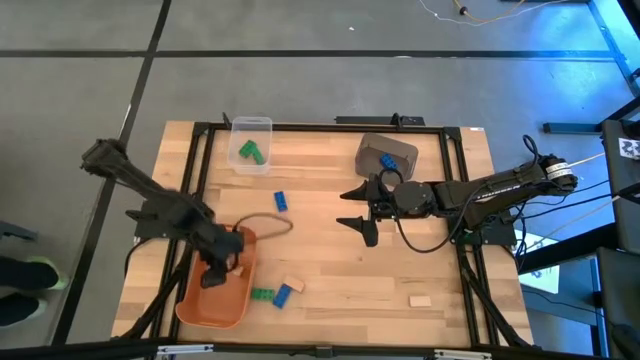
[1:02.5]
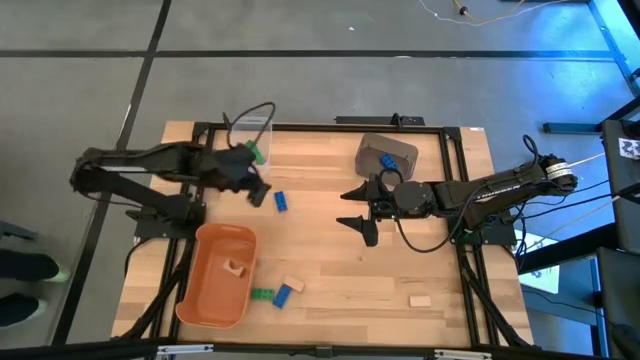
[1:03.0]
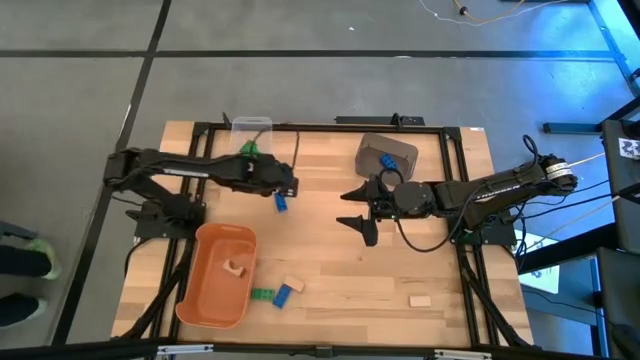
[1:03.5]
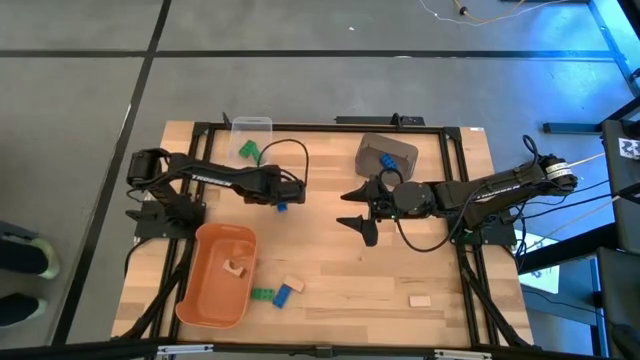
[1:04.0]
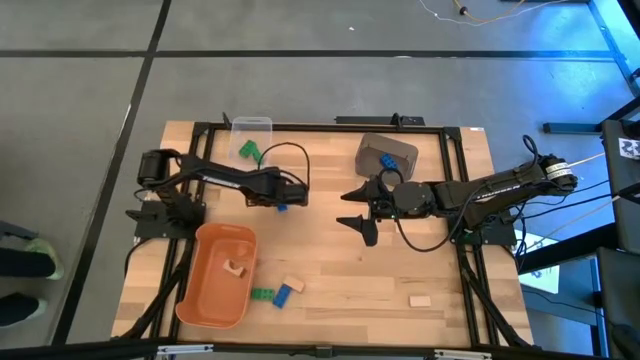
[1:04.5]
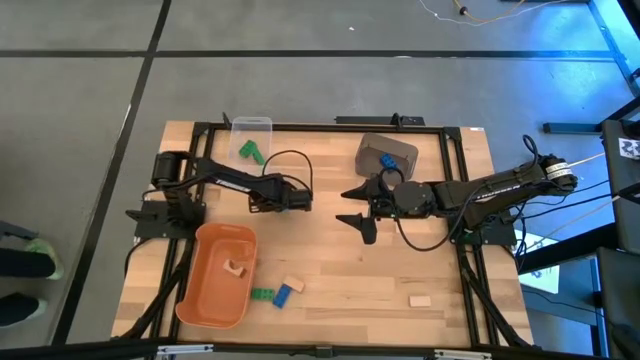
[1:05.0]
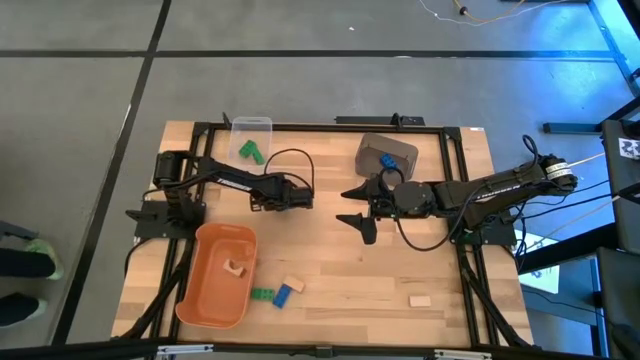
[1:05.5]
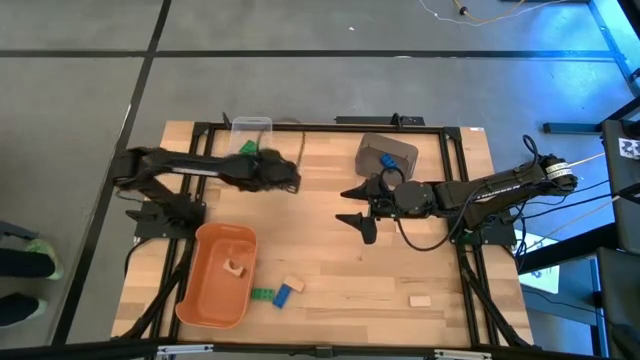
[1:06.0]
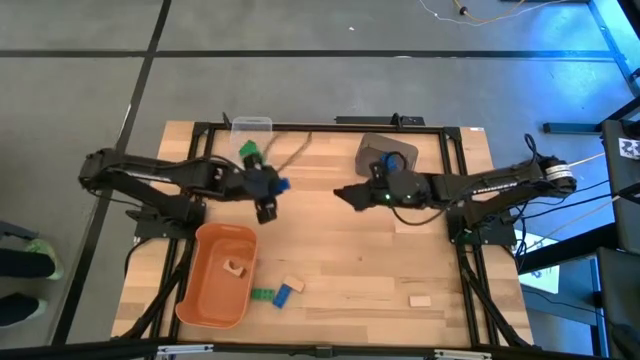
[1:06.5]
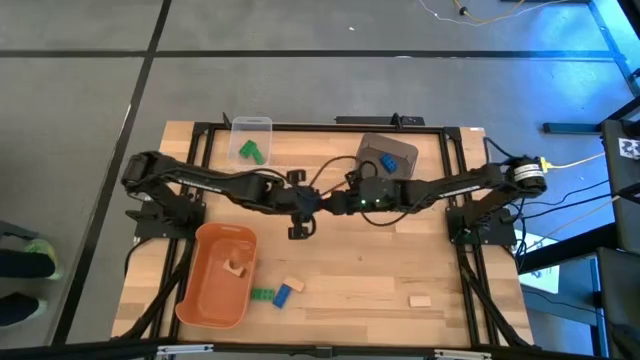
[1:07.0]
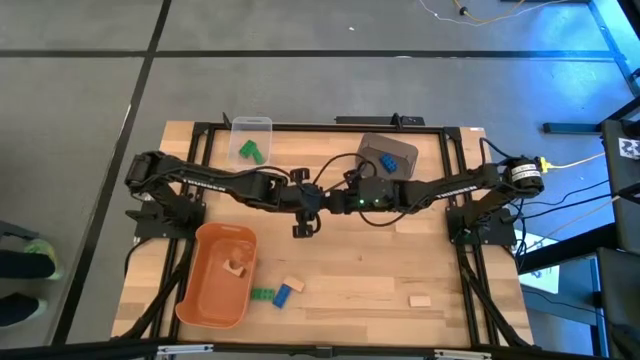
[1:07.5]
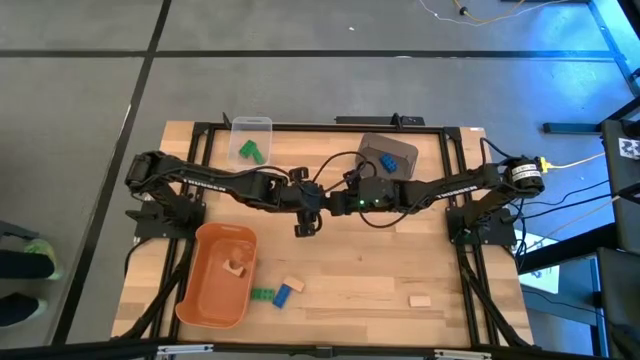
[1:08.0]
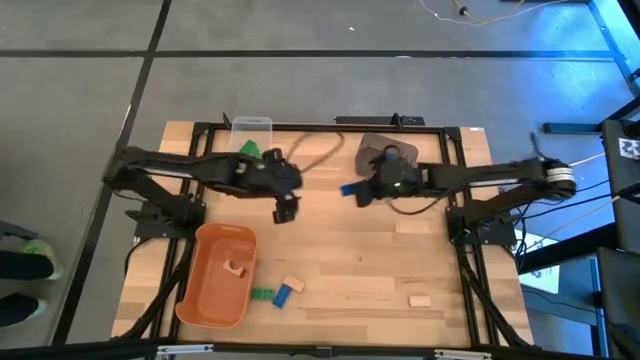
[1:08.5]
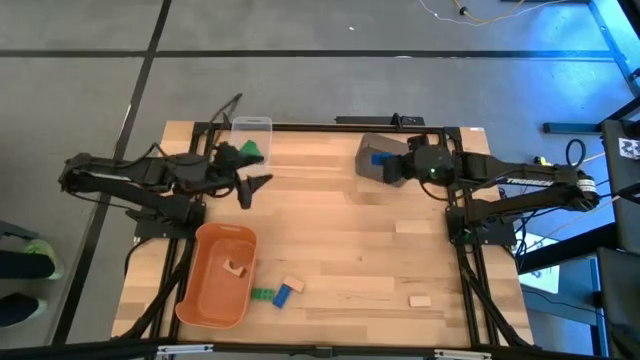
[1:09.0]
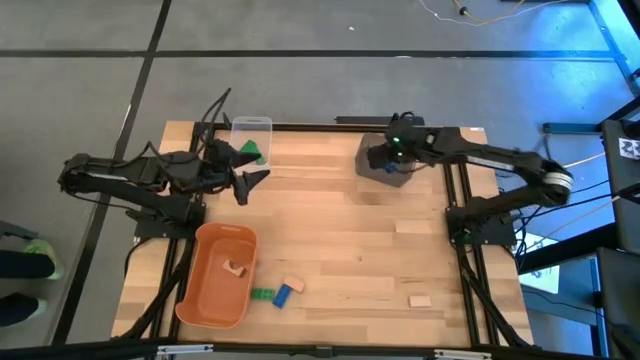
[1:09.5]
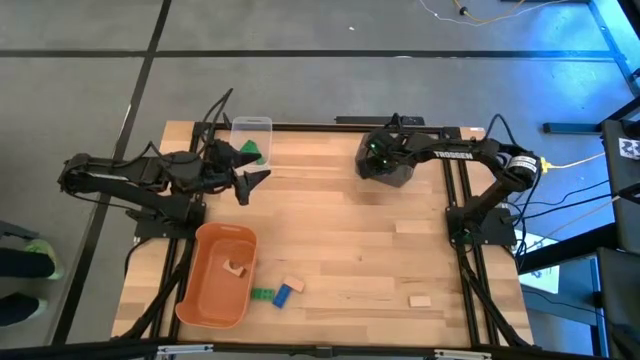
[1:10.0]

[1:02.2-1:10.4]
Task: Sort & place blocks by color
Put the top blue game piece into the black bin

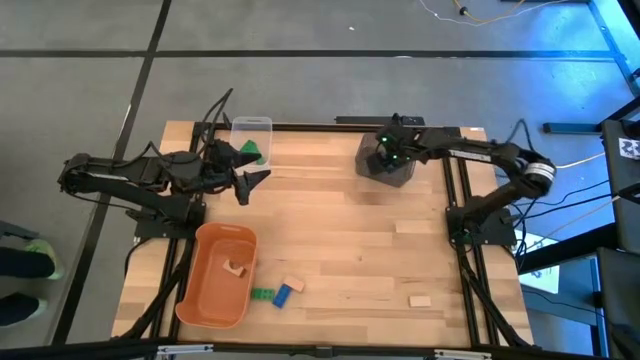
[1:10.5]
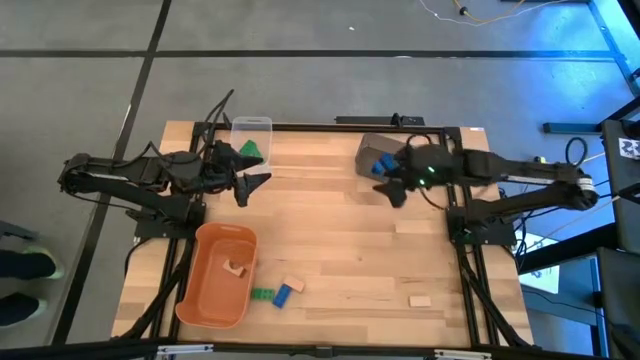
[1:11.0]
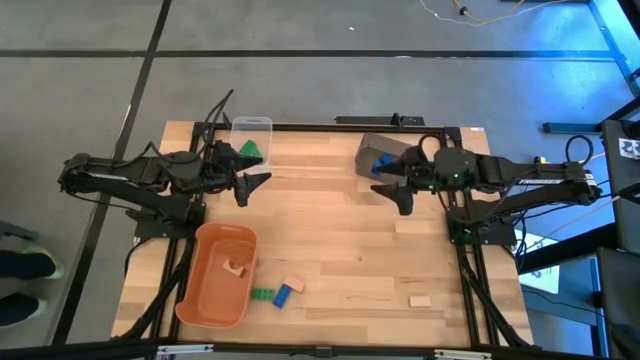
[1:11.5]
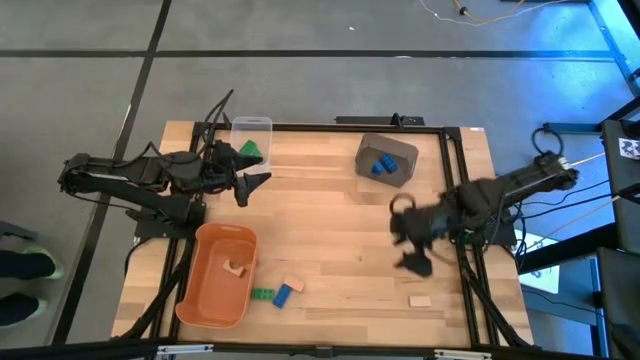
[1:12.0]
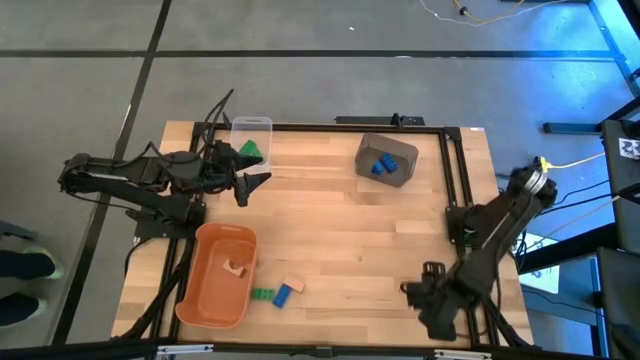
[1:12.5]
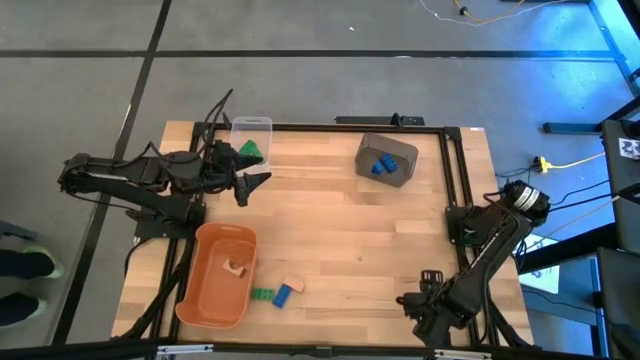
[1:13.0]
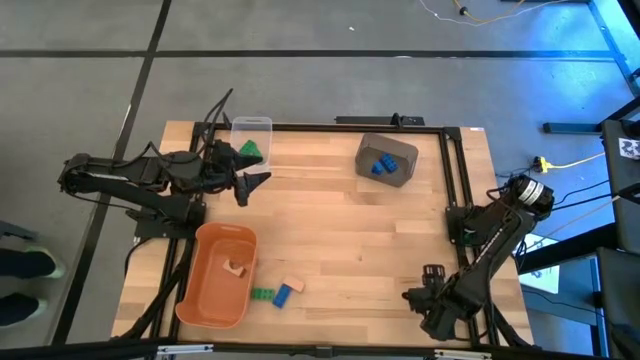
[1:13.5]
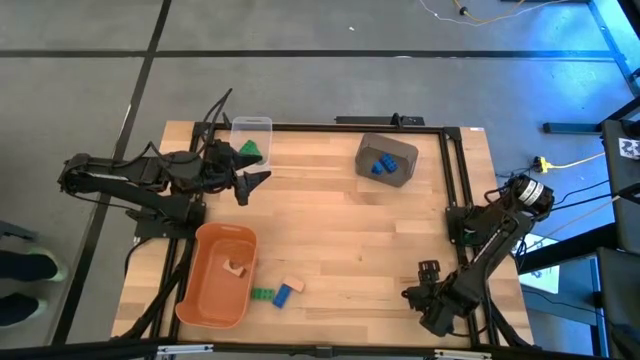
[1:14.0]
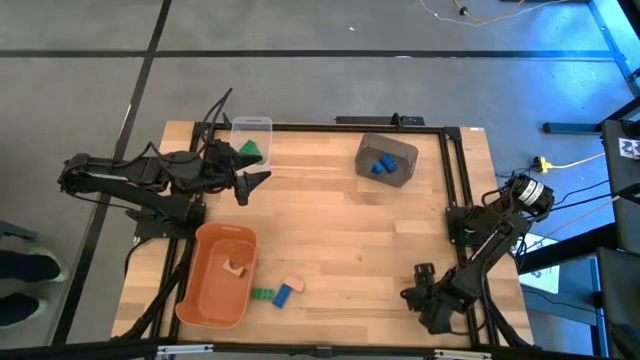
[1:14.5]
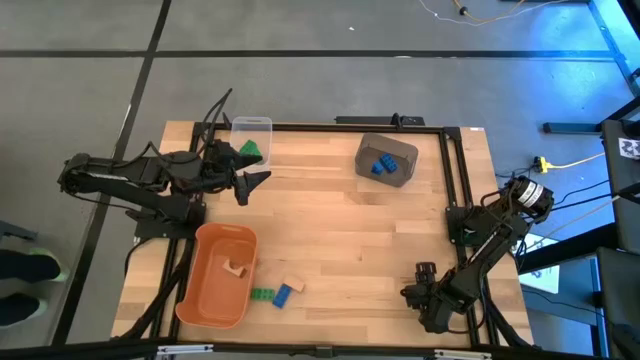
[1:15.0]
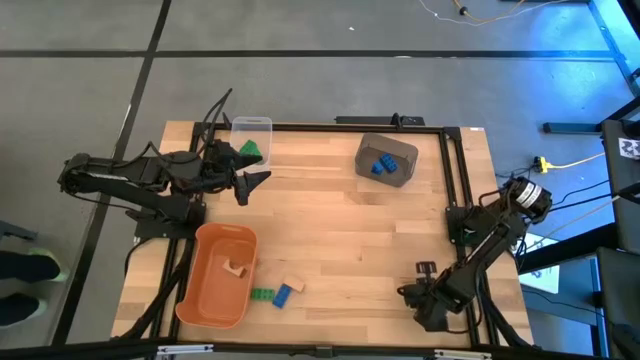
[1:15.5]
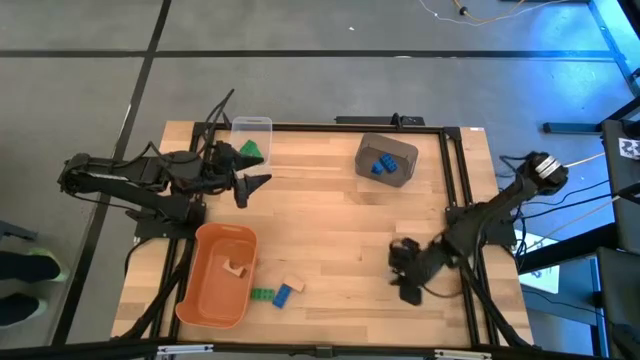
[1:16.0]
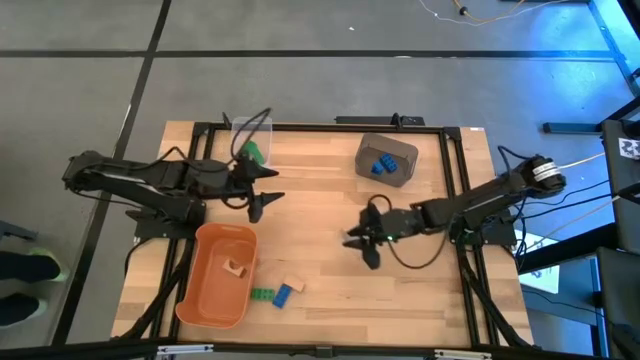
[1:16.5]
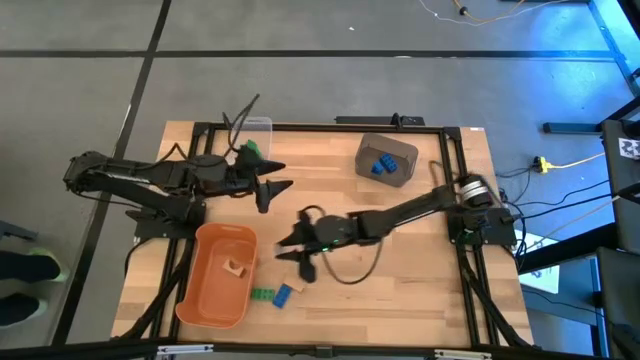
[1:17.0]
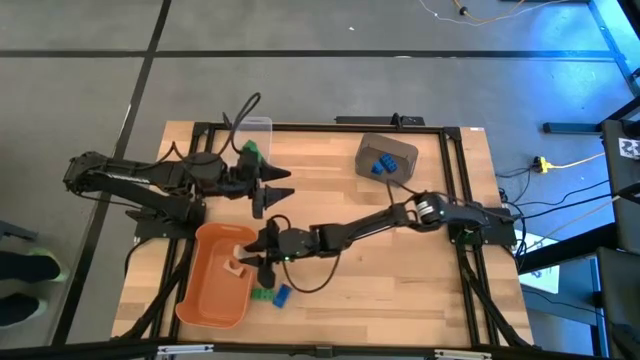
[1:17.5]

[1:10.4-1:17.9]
Put the right brown block into the orange bin

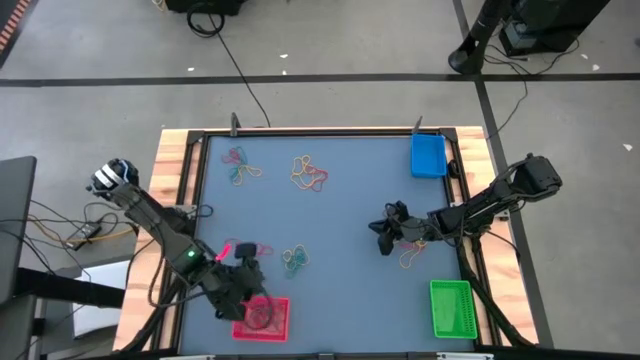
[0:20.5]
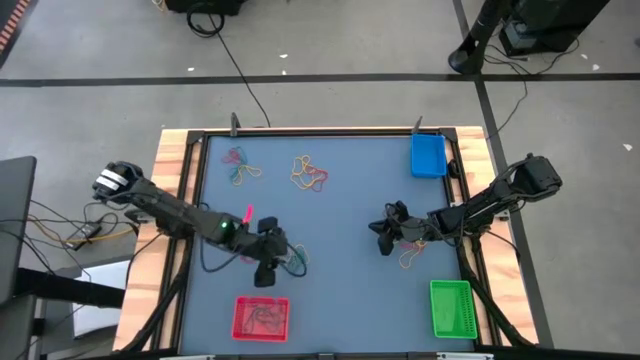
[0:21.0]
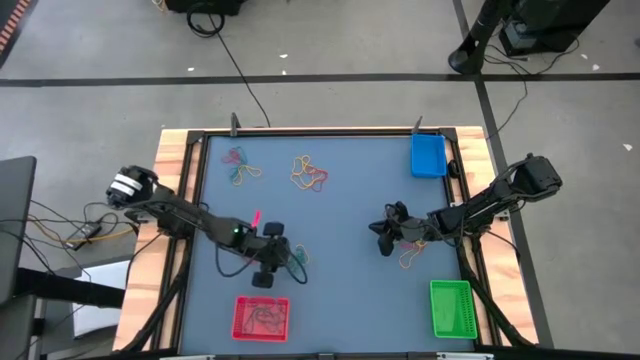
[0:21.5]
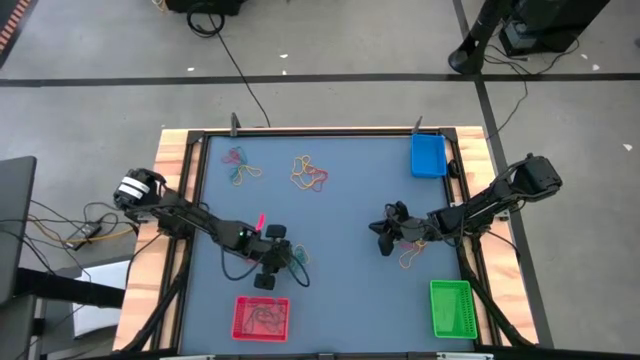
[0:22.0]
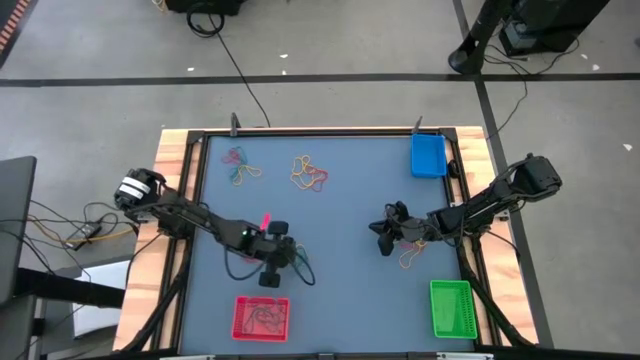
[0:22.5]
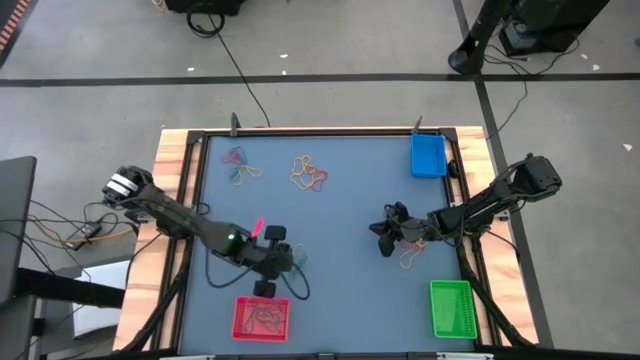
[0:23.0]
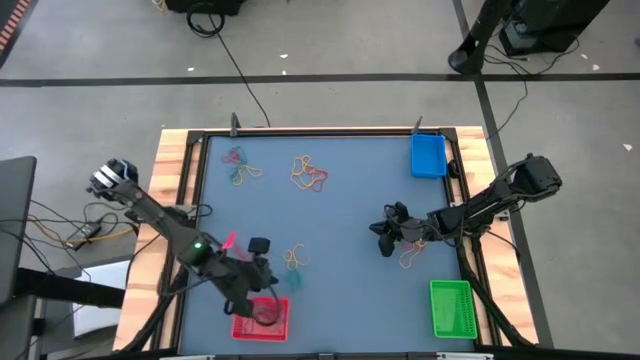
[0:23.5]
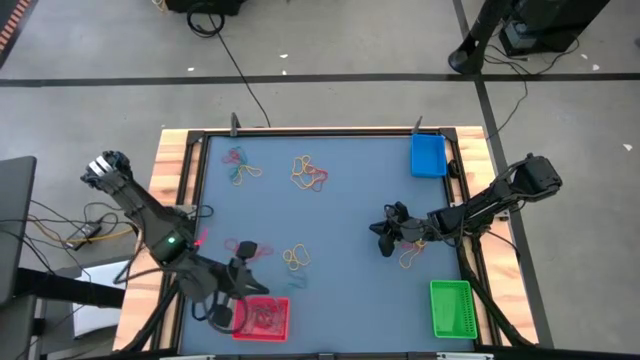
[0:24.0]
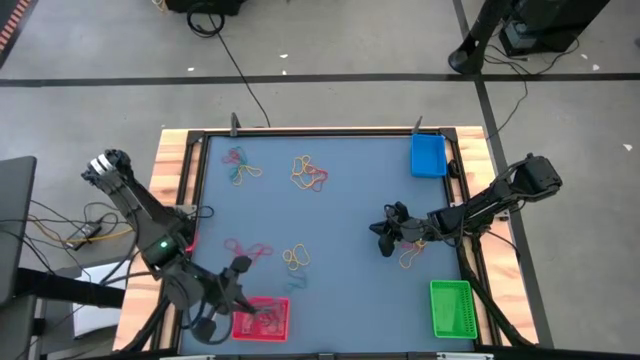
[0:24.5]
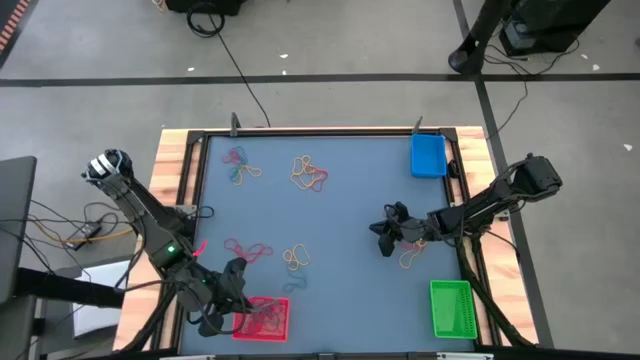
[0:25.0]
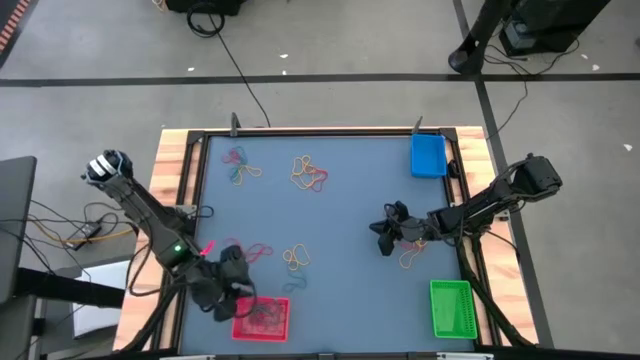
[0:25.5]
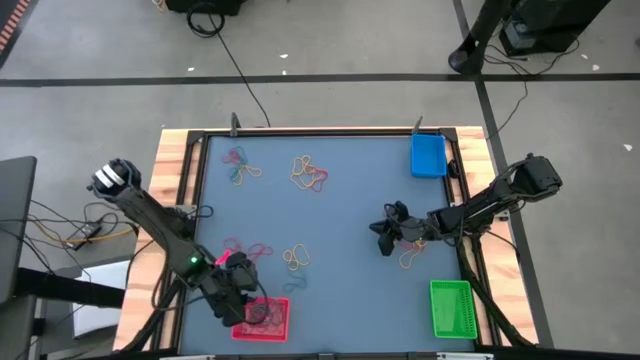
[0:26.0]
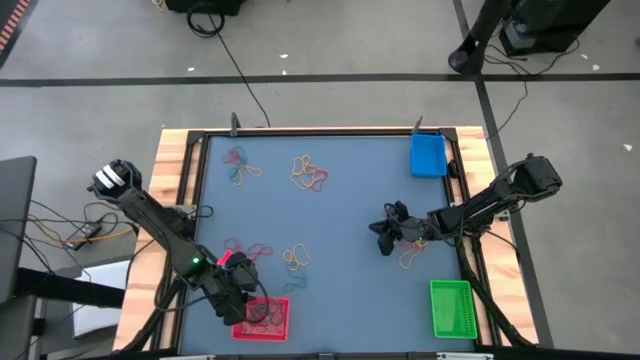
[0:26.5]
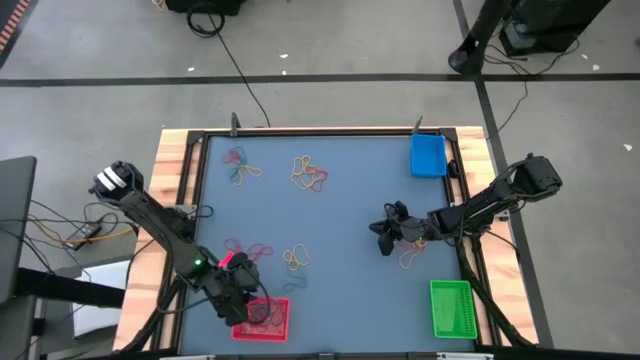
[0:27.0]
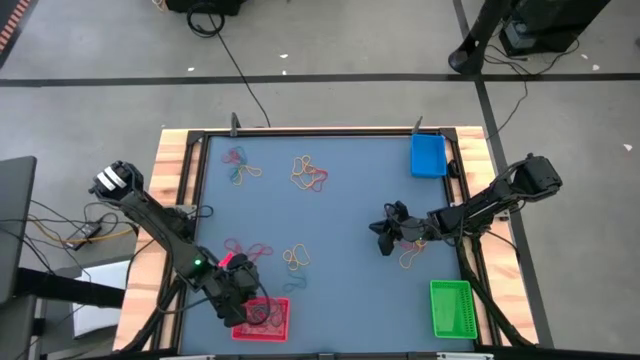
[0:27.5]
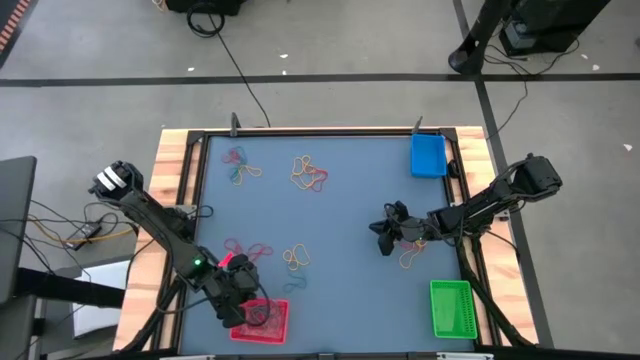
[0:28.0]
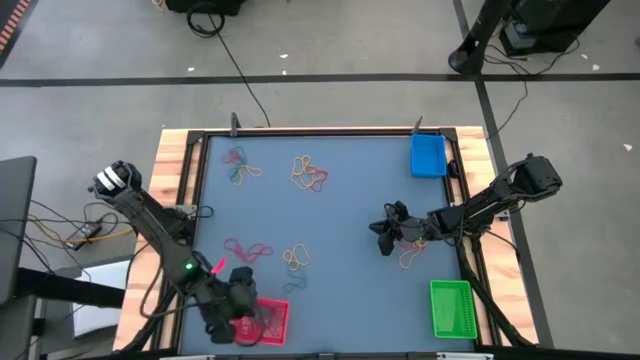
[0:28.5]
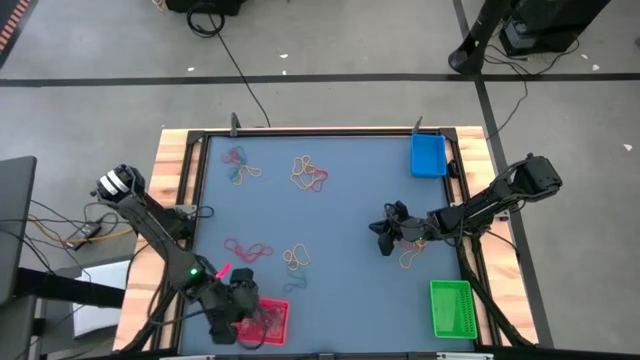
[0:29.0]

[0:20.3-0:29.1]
Task: Sort rubber bands into baskets
Put the blue rubber band into the red bin
